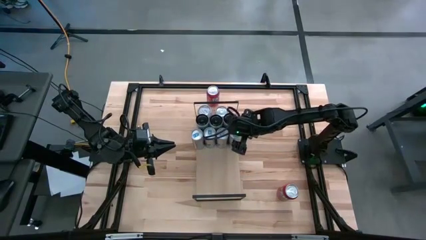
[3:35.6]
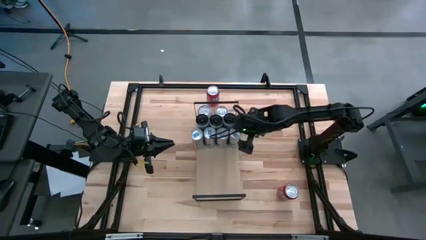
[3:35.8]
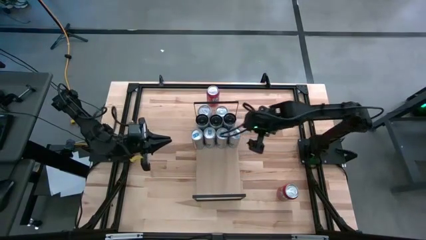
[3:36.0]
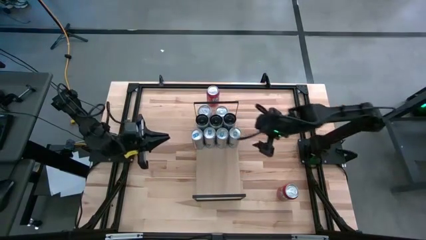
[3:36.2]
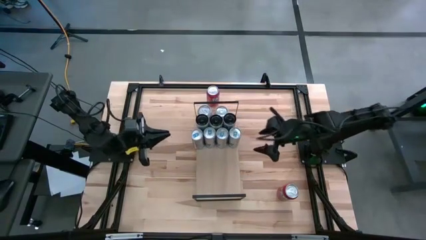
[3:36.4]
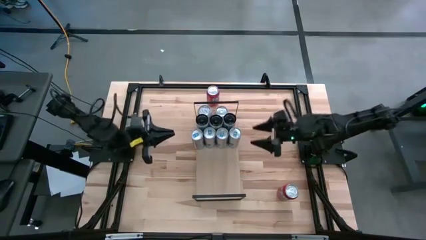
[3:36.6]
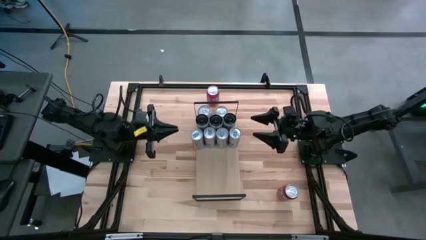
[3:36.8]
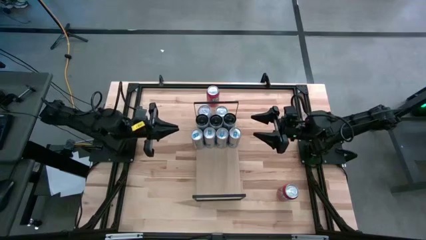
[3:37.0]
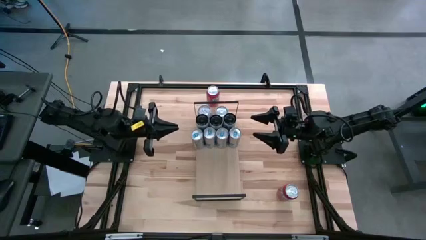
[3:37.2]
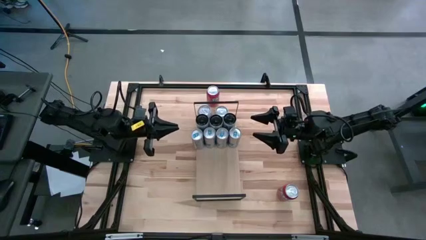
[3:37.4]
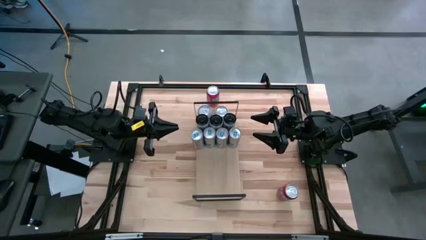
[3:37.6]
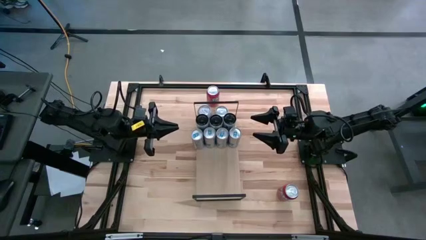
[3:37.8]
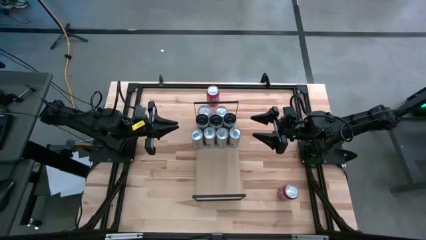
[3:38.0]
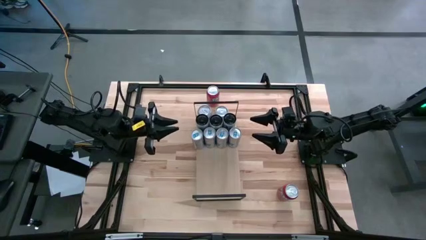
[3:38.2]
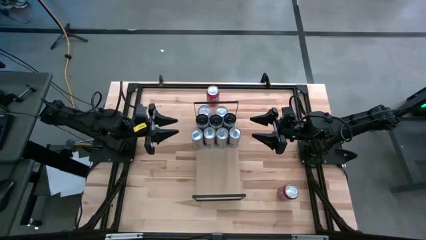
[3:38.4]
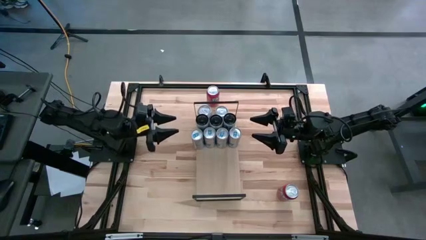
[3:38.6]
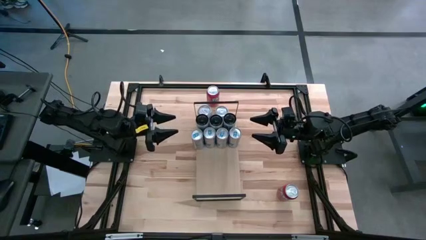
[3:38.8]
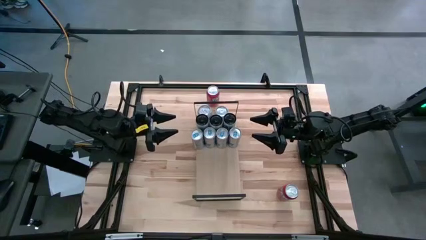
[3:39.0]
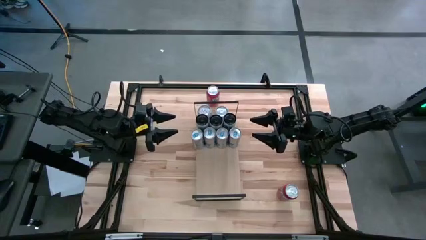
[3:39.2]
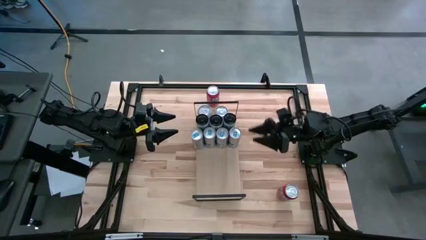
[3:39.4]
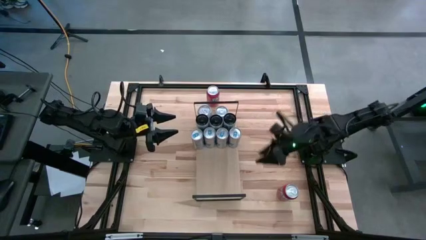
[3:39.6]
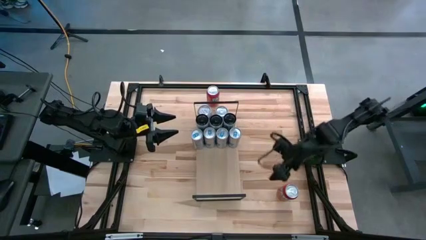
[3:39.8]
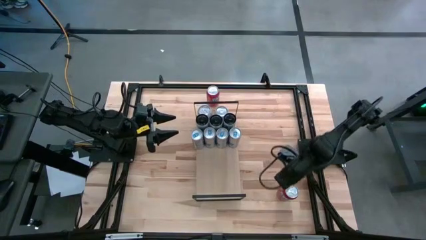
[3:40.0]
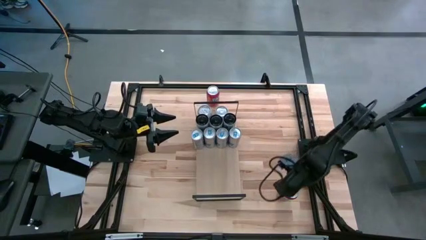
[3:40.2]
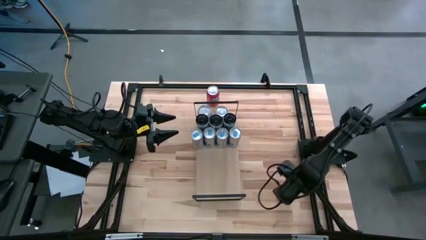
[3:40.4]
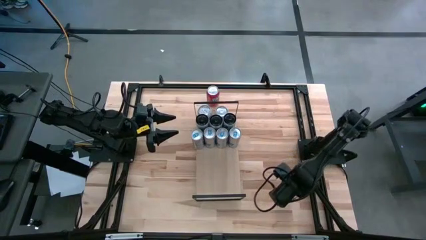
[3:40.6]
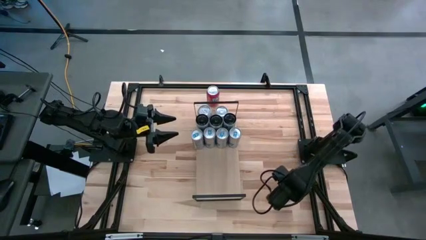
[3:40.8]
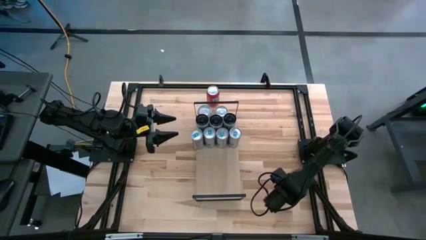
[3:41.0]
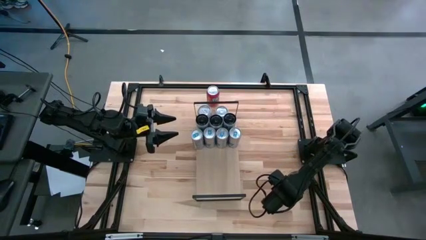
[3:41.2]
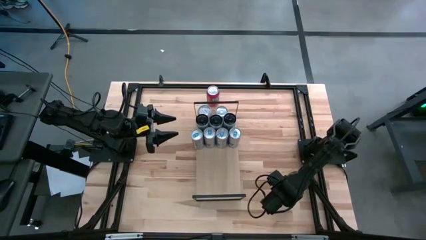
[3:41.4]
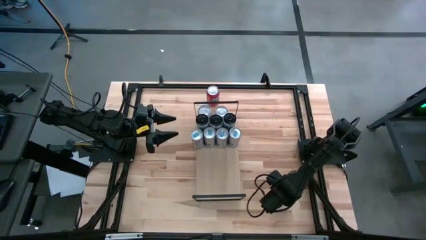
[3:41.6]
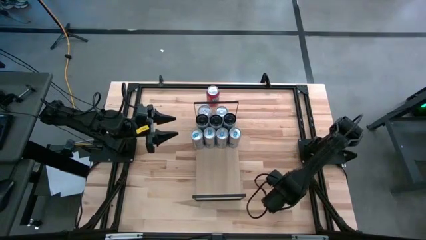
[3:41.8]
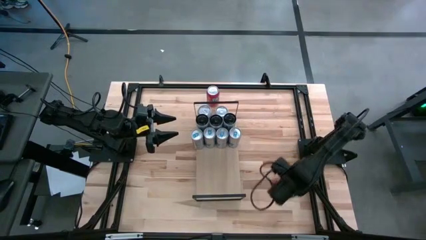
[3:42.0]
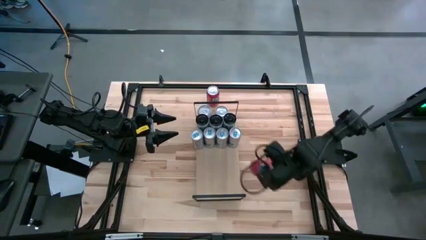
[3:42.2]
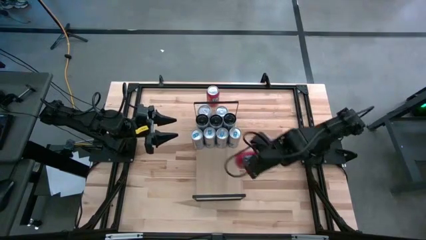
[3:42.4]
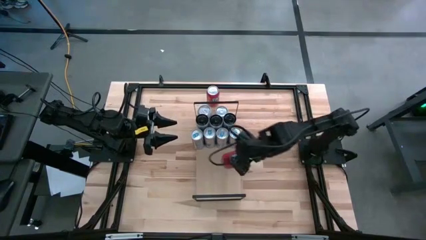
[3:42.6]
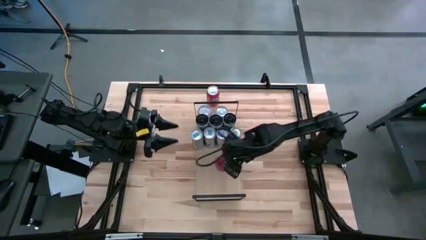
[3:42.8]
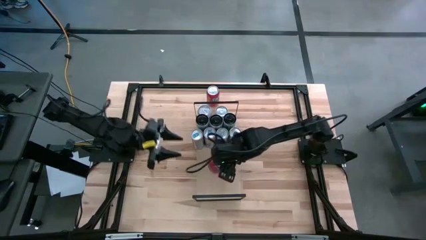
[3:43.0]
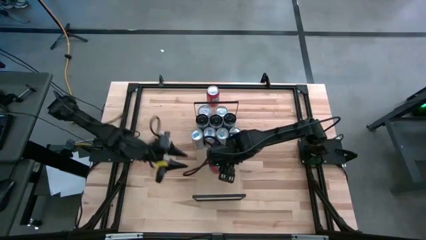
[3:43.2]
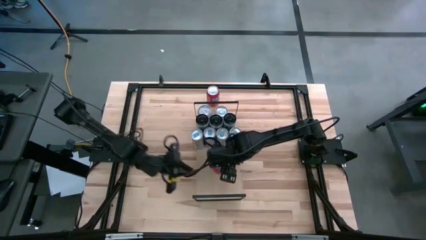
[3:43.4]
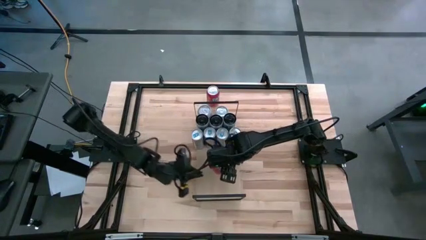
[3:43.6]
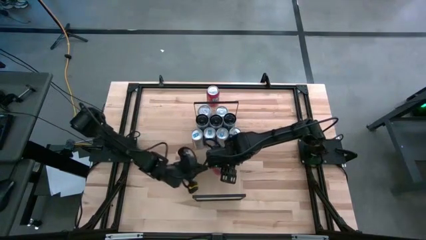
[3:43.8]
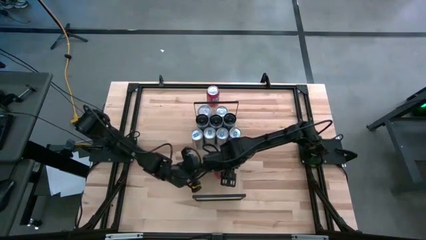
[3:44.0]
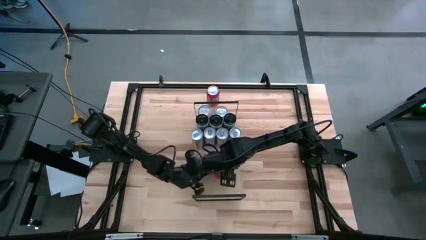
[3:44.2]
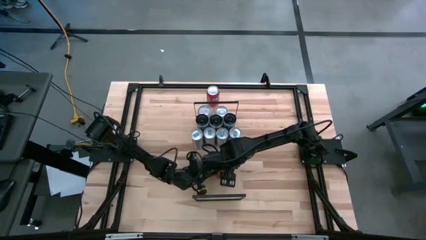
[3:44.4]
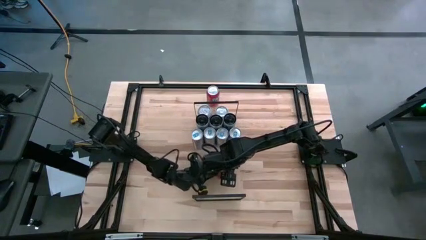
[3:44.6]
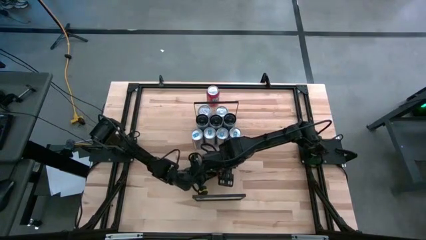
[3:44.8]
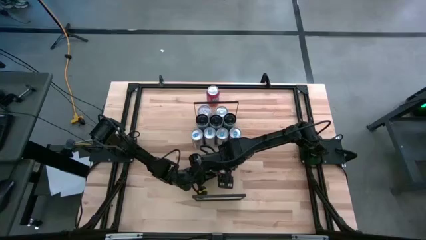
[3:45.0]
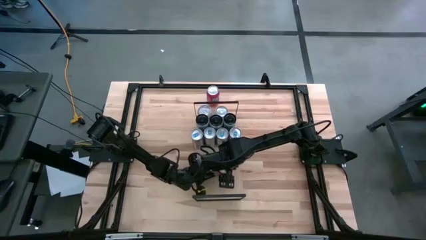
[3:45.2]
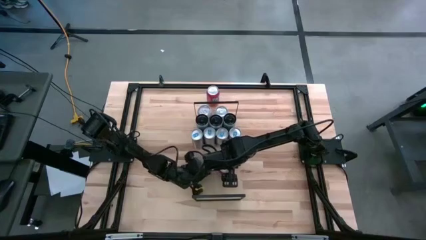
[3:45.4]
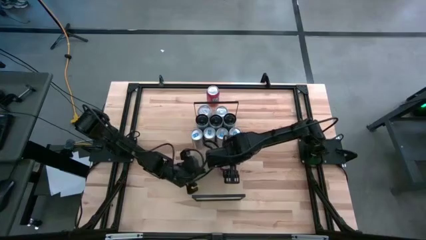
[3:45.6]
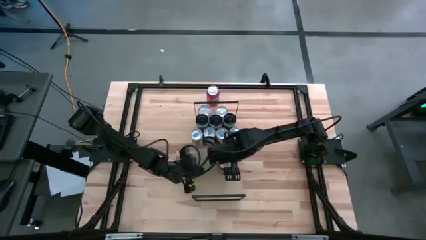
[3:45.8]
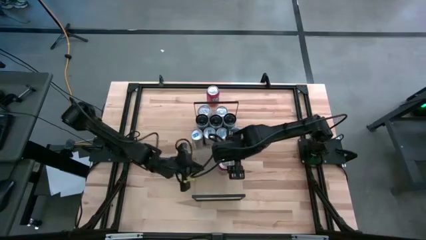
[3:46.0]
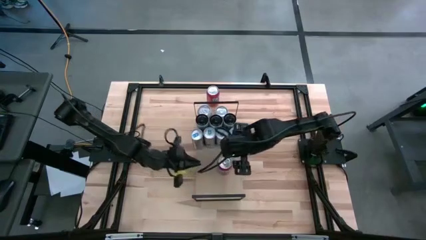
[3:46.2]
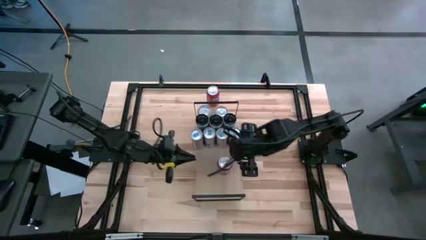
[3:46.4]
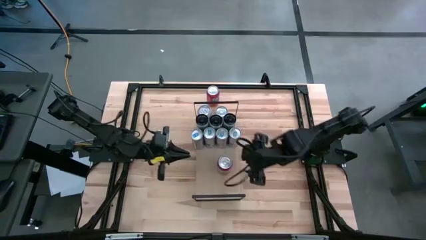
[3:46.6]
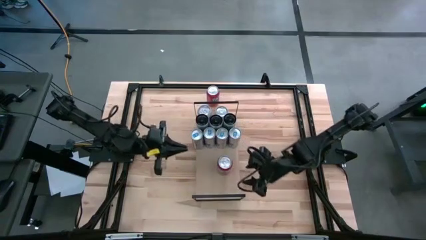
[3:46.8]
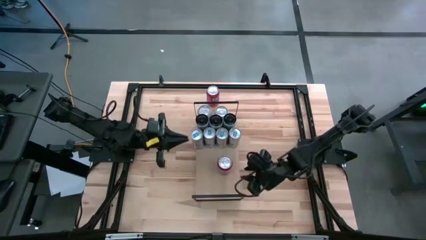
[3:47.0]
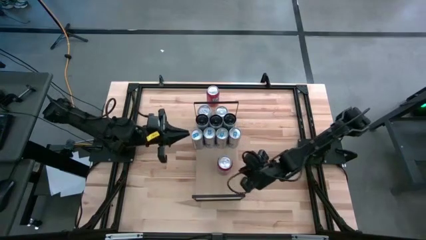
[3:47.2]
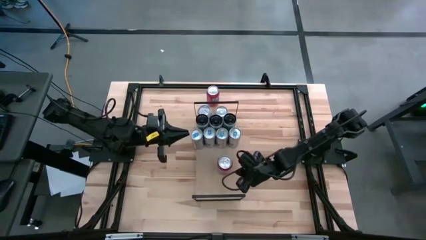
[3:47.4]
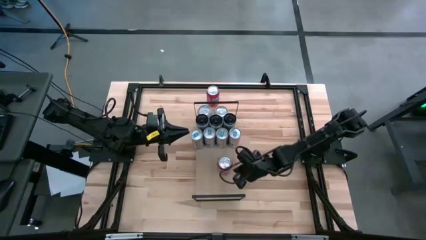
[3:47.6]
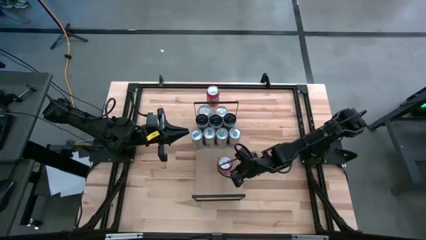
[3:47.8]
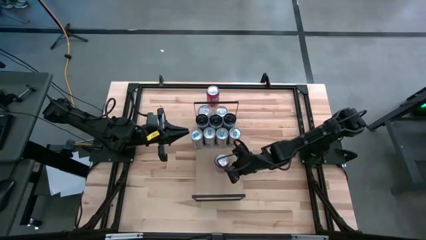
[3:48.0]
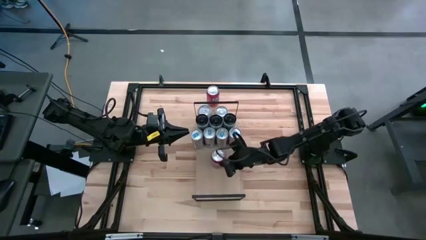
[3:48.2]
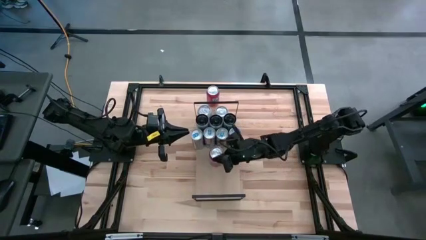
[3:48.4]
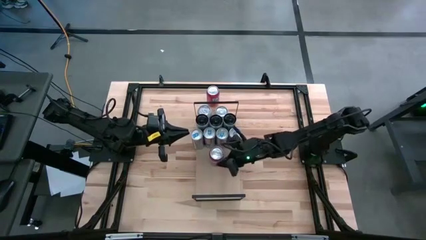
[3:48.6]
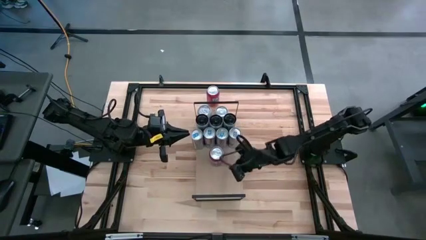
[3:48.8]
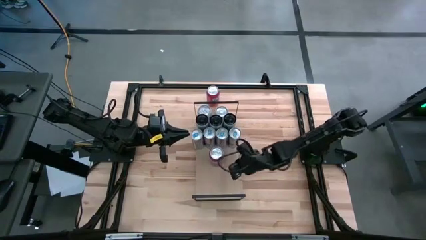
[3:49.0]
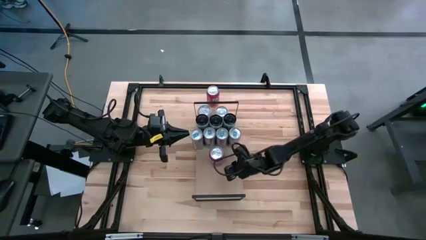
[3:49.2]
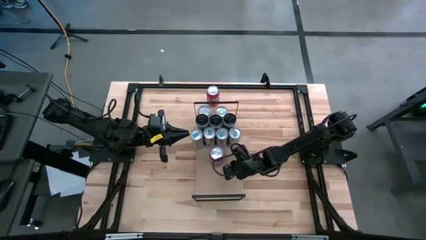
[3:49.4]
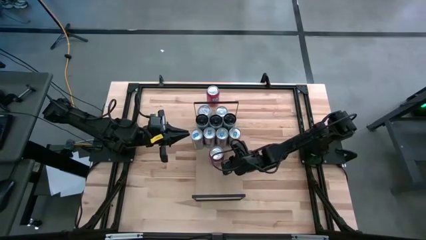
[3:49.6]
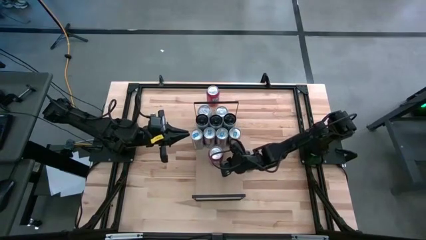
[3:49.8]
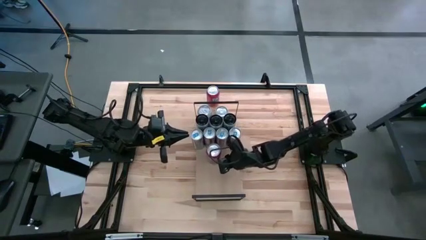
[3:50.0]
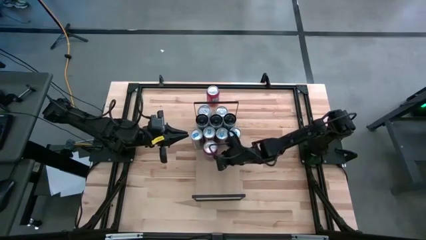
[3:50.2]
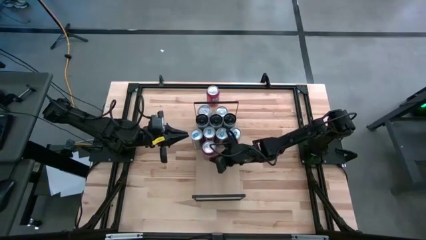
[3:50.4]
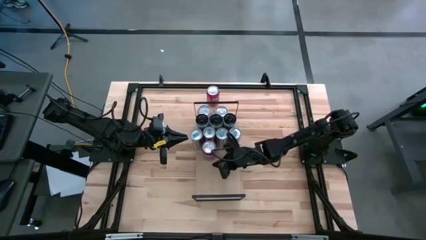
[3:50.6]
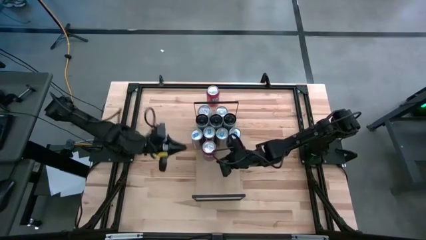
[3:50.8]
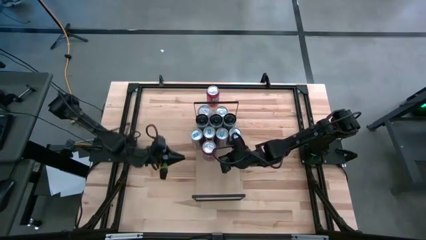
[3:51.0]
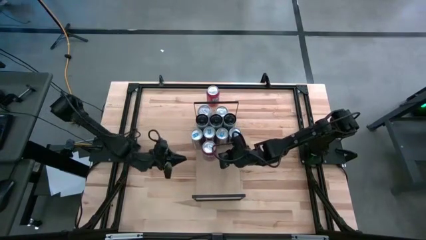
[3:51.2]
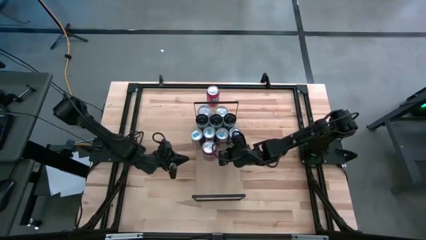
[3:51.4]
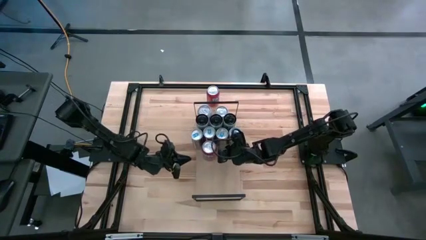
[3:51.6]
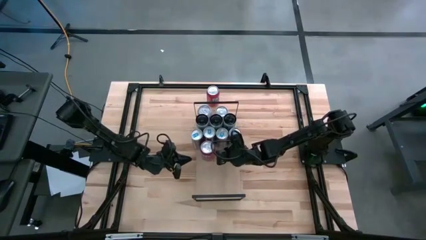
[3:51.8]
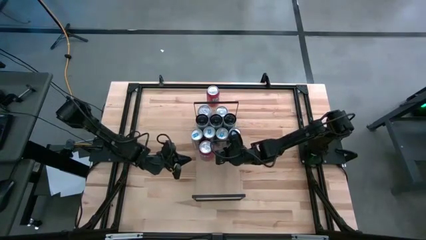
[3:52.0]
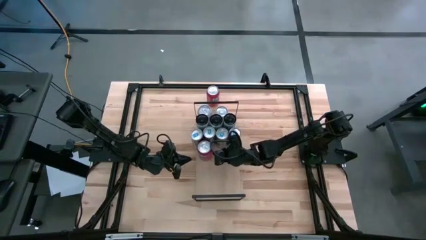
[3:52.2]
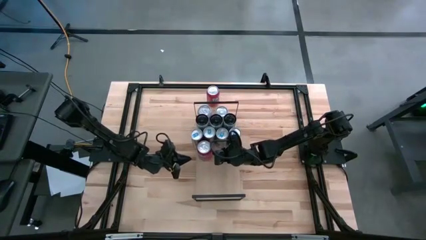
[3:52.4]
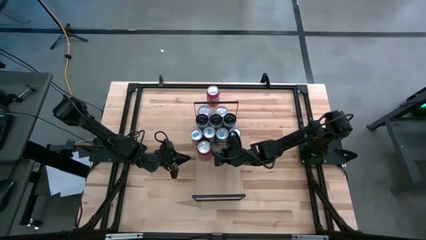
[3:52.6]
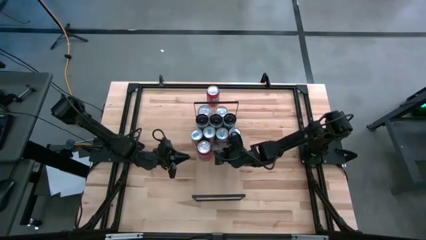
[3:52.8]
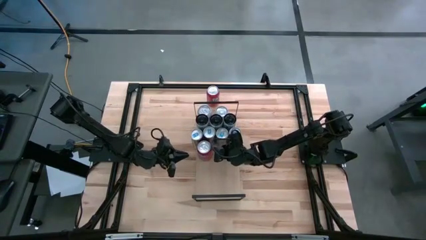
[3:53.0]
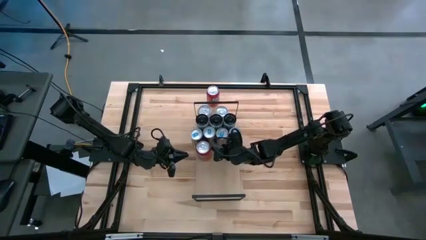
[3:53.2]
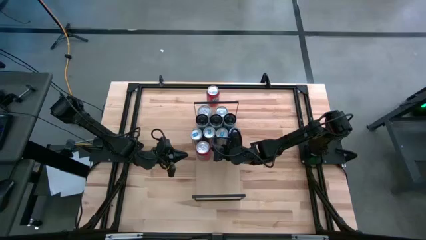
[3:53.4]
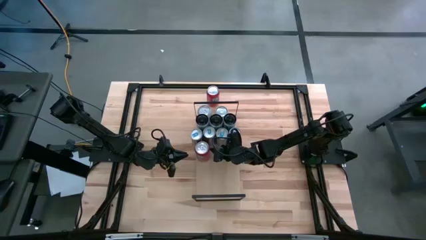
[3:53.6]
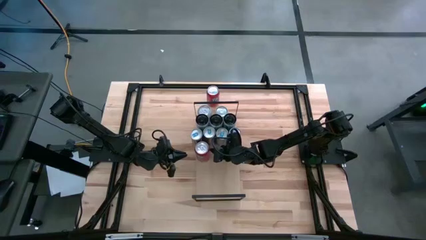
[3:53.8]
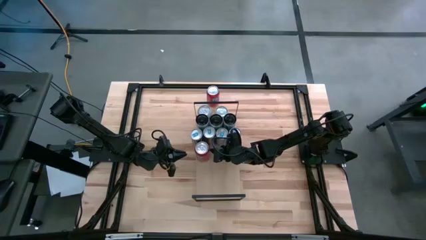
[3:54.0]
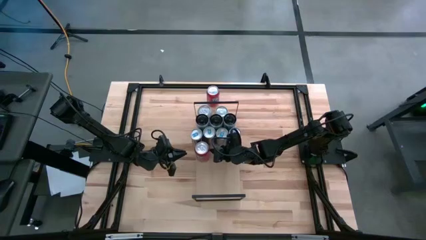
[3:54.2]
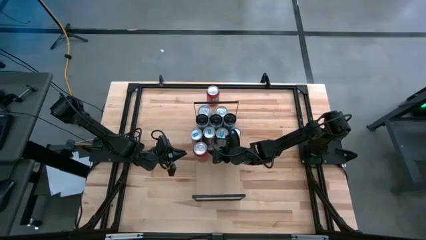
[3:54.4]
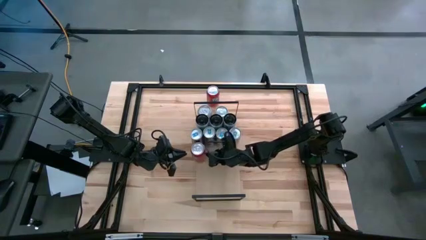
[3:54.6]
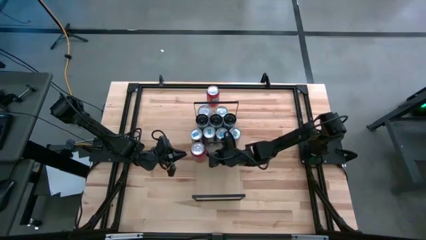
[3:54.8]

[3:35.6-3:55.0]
Task: Place canned beverage on shelf
Put the bottom red soda can on the shelf
